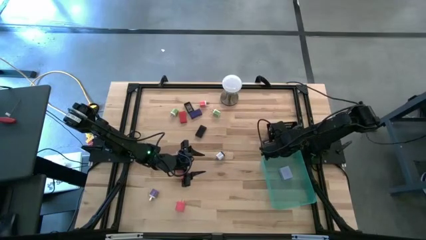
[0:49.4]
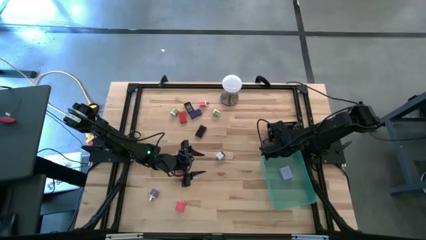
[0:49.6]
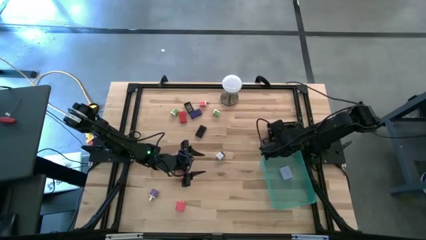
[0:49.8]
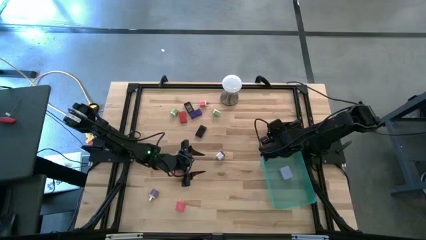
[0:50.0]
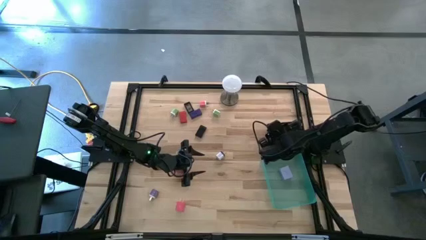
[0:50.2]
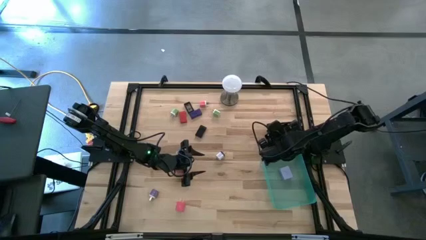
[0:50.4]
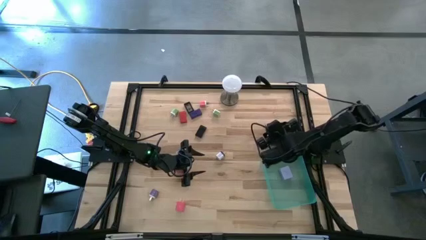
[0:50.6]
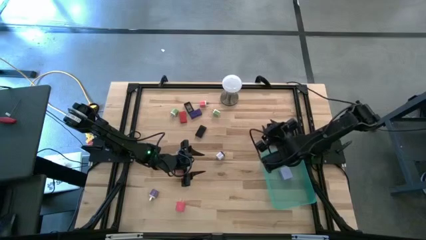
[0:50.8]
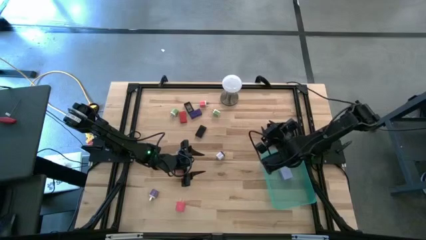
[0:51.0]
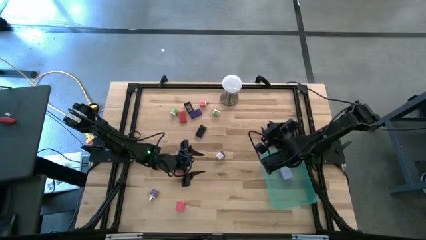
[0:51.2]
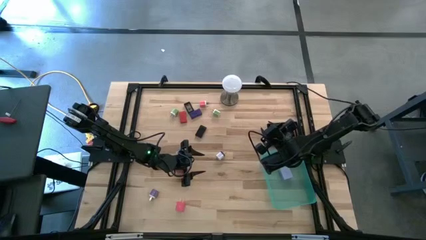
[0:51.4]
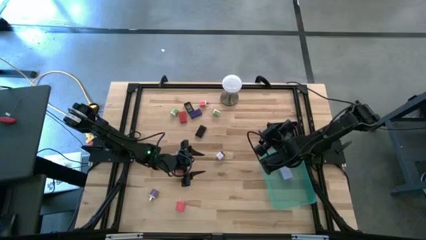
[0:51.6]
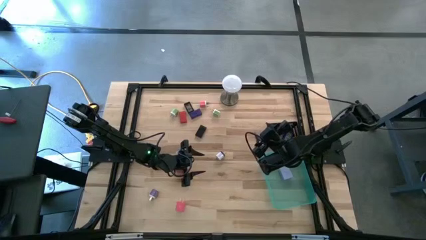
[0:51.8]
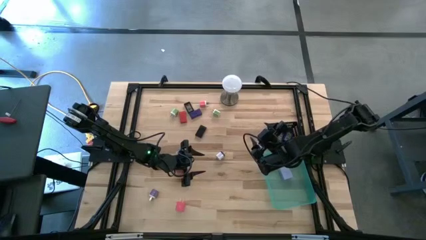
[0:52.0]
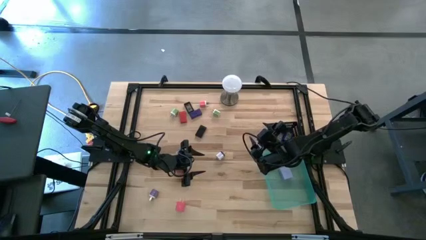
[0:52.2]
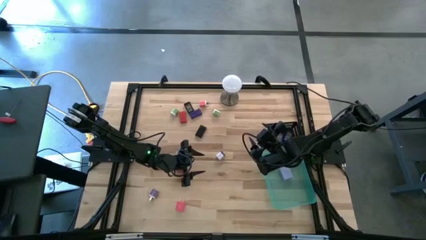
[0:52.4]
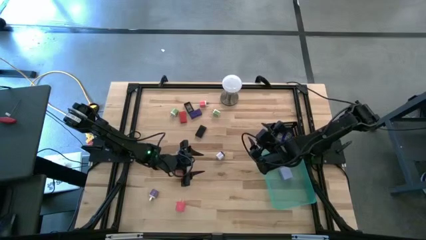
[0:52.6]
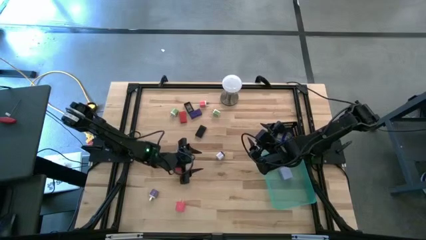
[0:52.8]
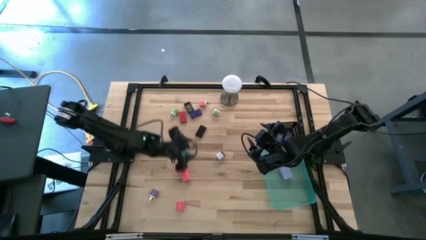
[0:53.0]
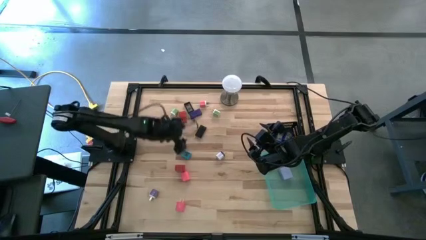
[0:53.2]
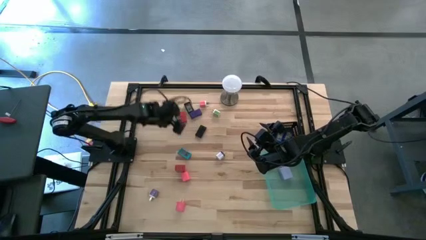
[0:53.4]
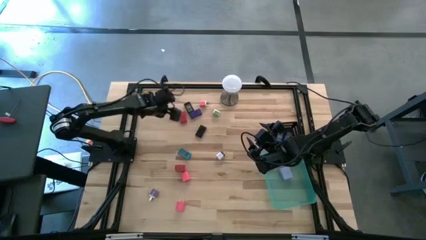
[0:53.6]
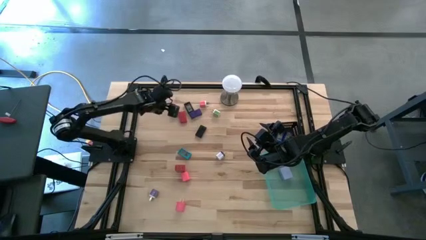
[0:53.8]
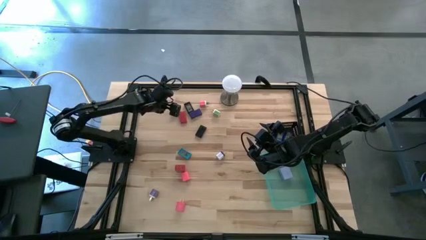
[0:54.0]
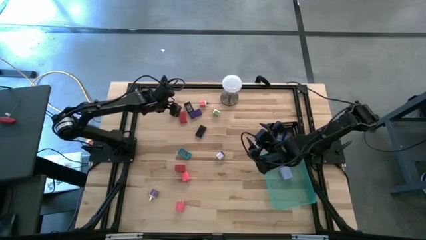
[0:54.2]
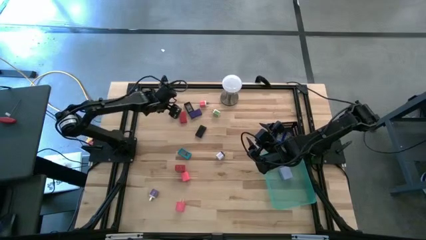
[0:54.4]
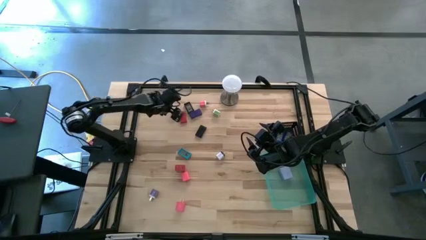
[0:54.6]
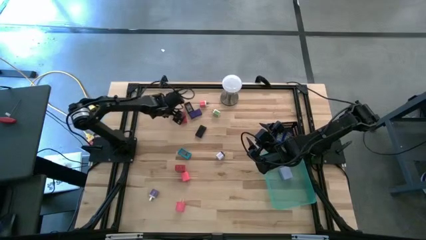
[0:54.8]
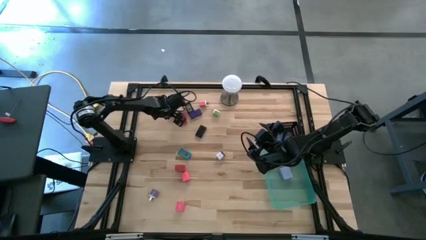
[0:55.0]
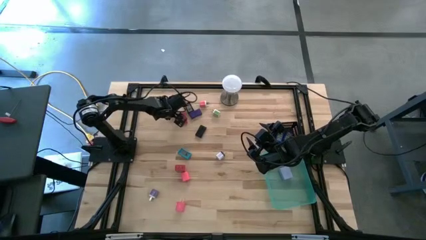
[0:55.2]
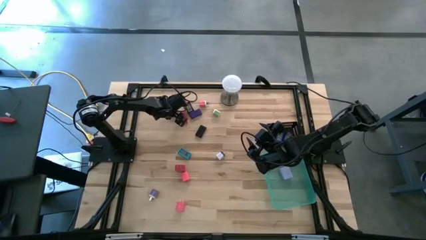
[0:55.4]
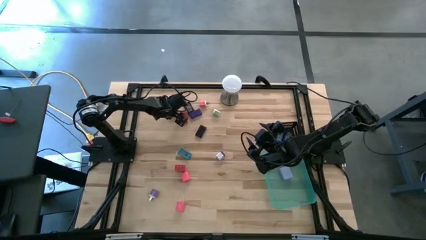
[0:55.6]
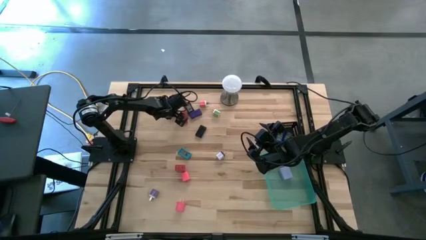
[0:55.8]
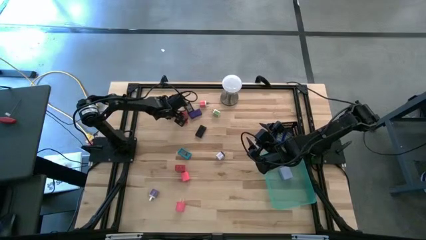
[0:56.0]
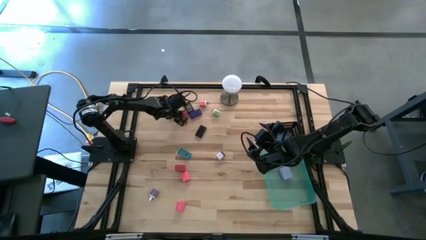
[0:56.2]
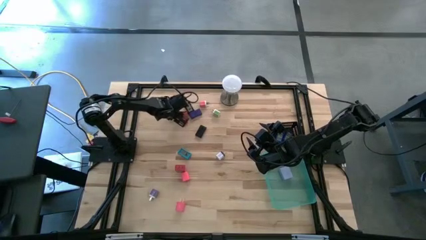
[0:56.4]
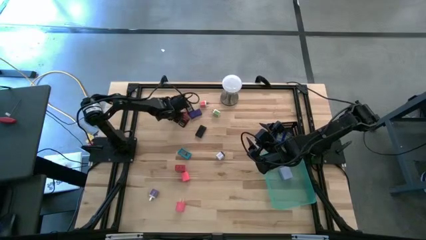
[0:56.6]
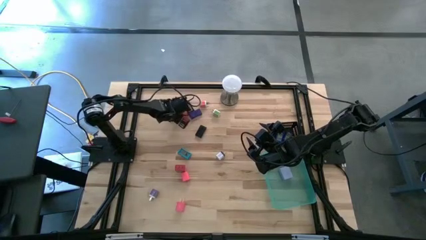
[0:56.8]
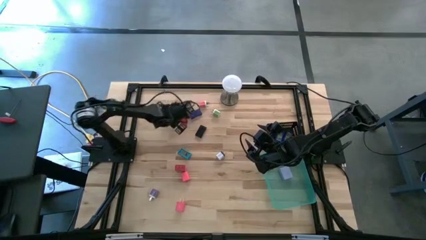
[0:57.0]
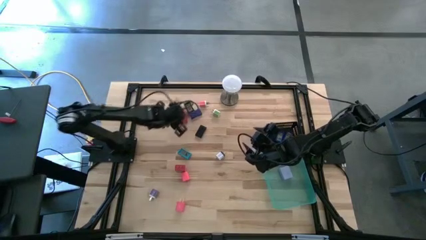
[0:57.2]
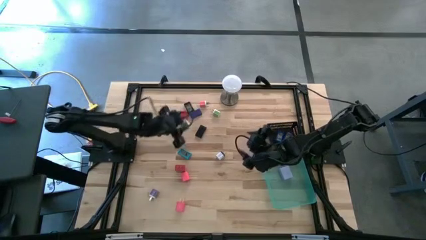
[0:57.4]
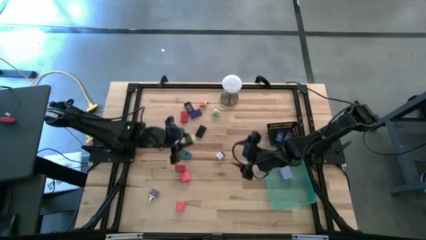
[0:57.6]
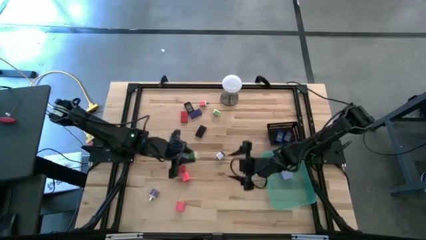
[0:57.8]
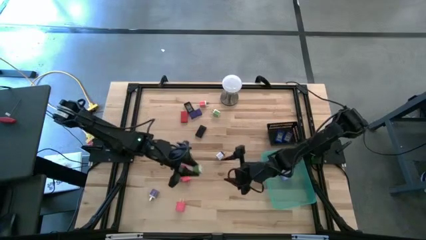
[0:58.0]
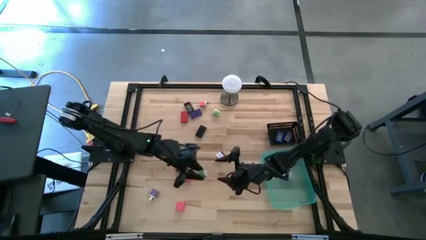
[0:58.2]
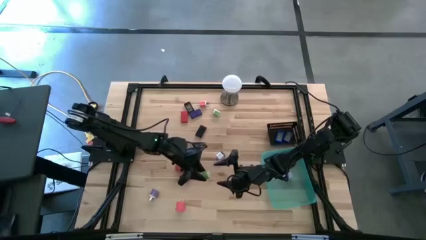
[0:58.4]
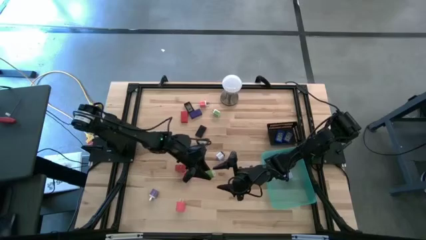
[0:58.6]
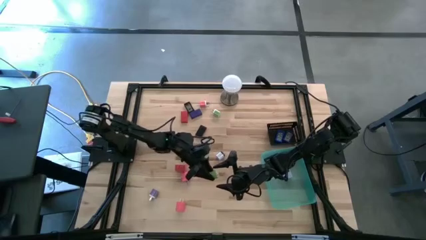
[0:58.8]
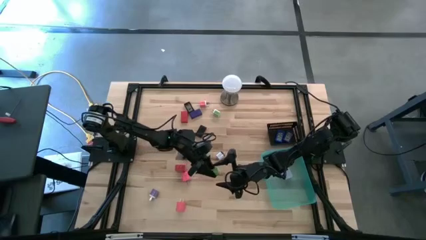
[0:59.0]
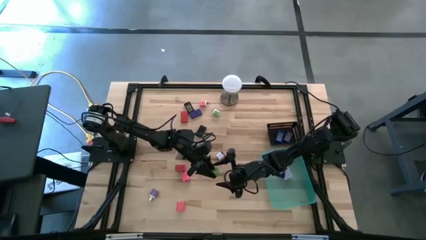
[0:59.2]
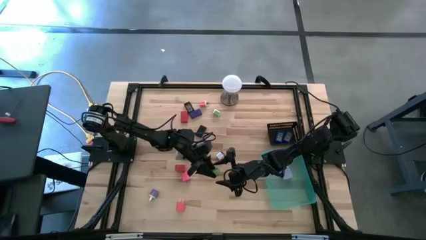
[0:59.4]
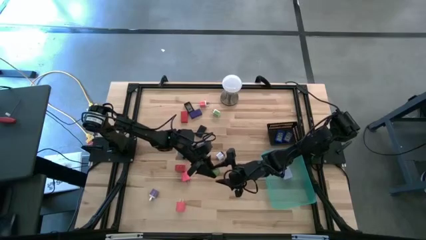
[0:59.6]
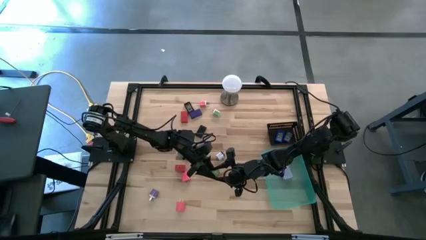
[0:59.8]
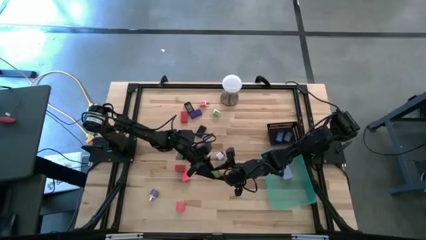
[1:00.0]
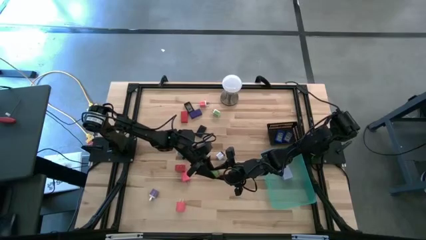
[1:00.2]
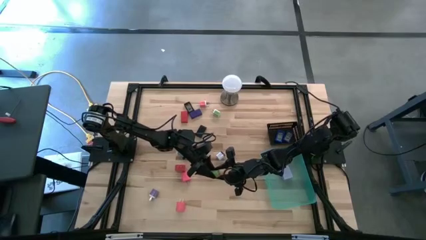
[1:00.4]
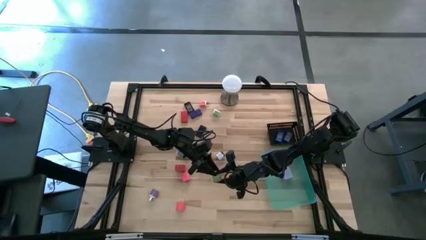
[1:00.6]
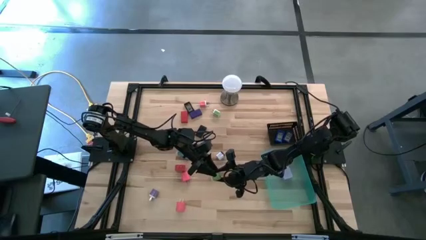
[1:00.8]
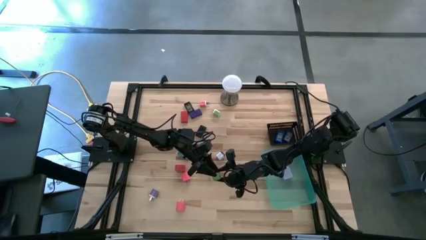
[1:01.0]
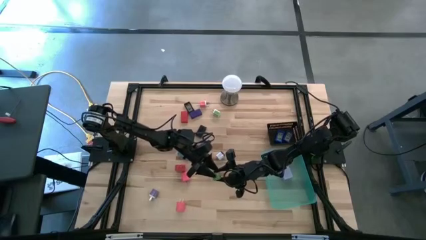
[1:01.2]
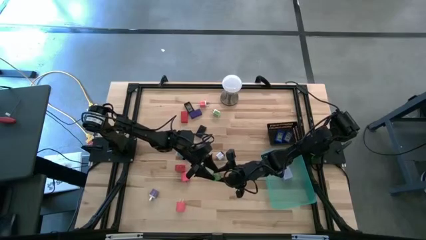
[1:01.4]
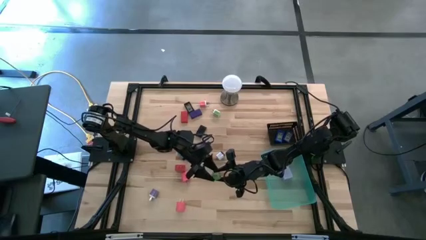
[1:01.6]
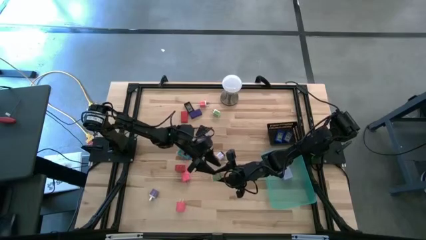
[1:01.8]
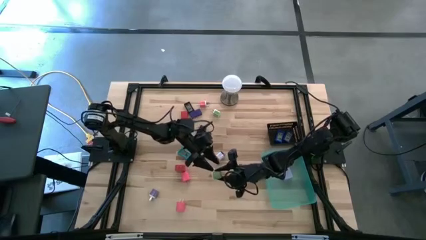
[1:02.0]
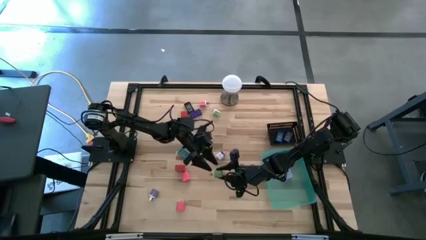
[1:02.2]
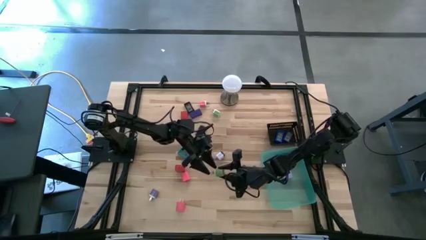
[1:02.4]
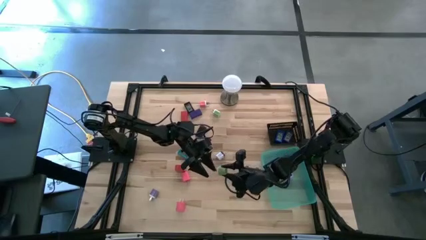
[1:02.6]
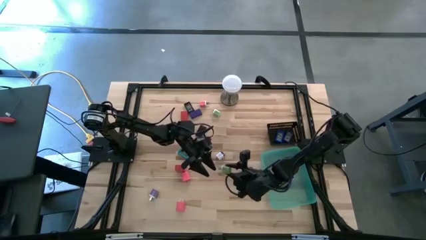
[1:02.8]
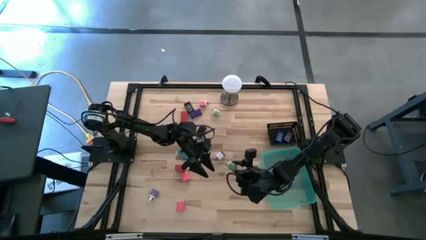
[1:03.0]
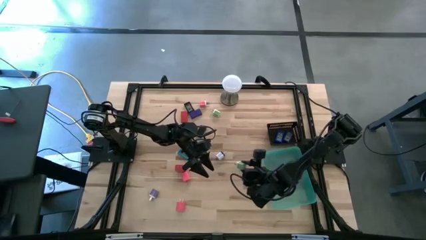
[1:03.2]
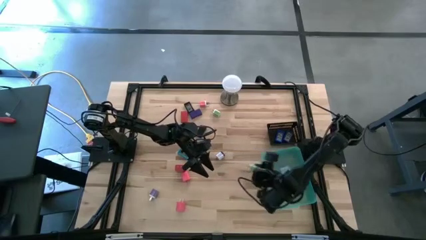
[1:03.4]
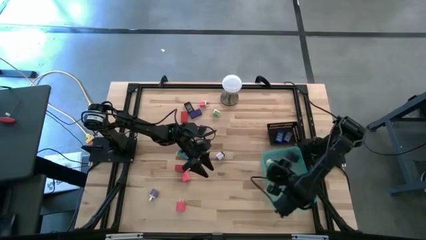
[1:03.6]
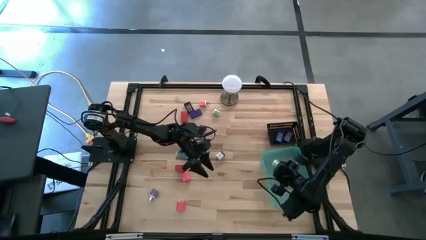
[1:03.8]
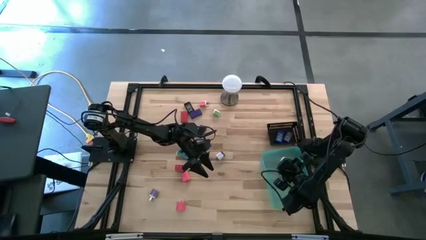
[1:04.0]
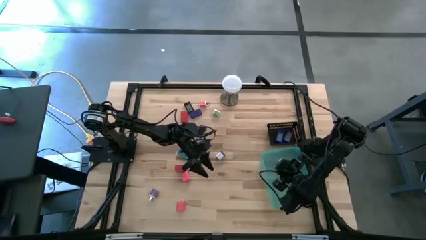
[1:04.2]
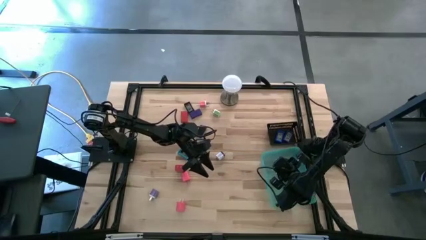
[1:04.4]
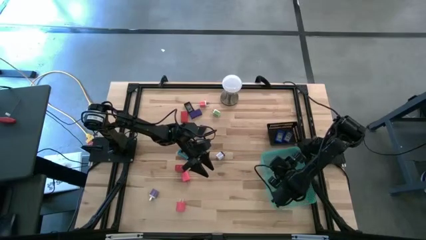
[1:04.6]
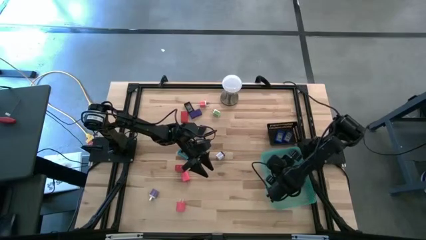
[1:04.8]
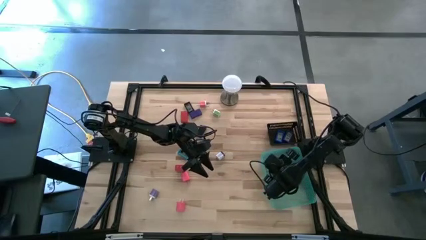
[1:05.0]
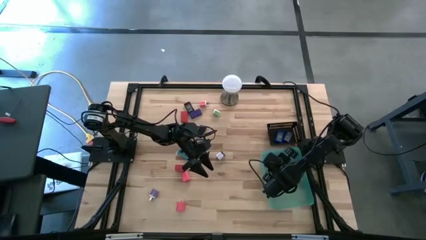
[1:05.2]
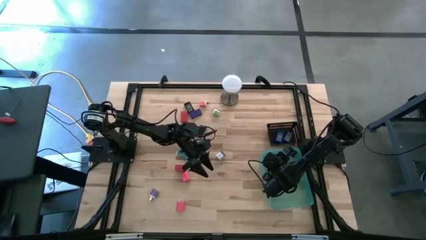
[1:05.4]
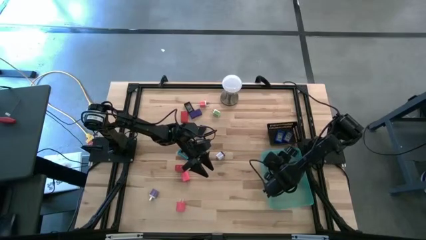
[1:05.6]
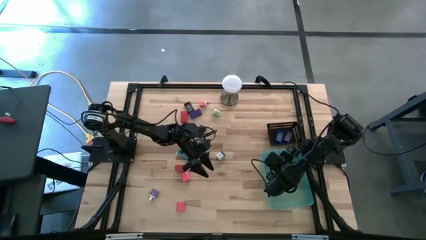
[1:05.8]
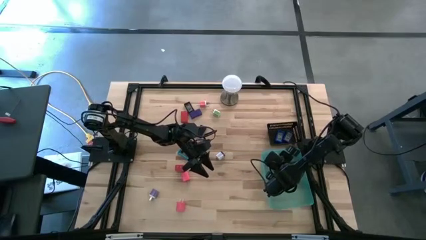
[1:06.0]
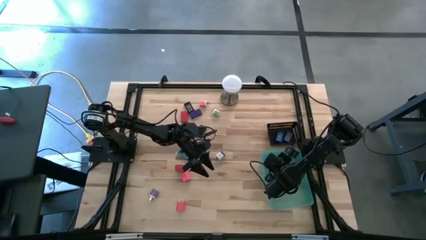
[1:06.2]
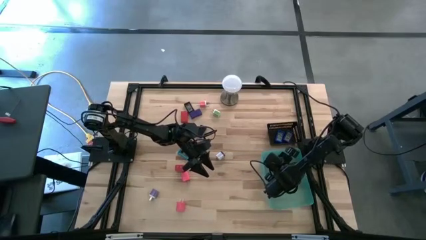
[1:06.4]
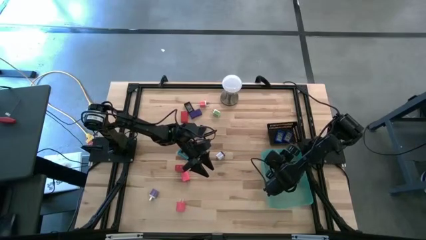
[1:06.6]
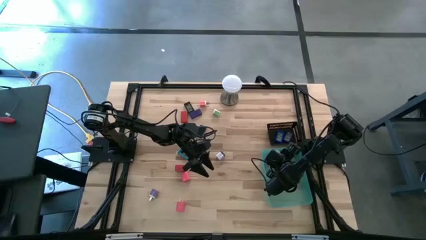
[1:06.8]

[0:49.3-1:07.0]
Task: Pick & Place Office items
Put the green charger adapter into the green bin
